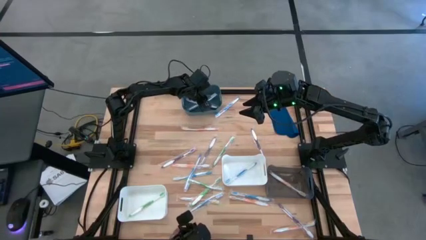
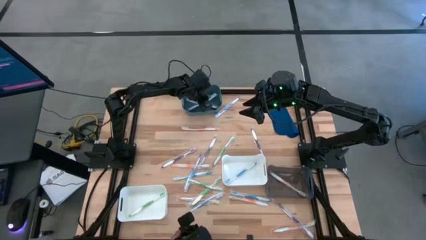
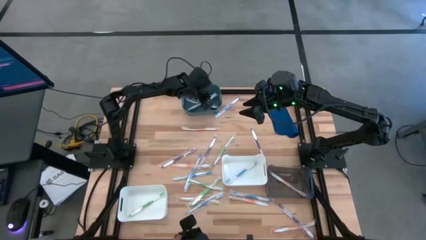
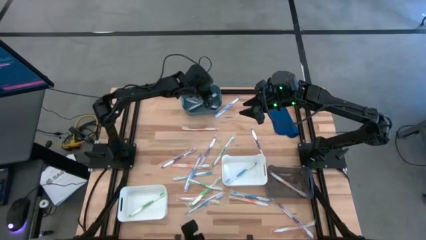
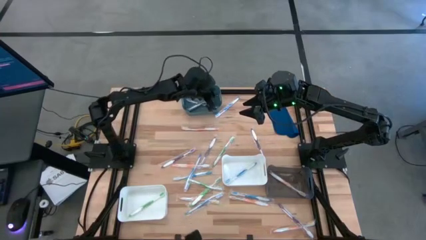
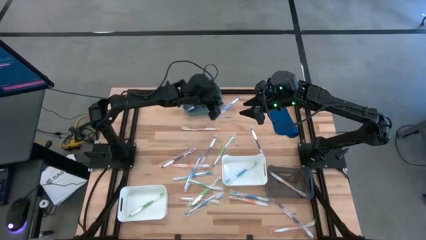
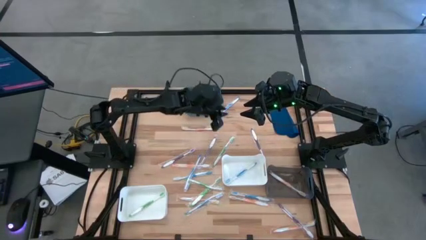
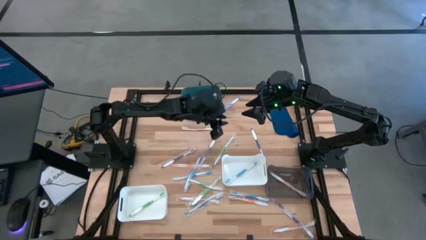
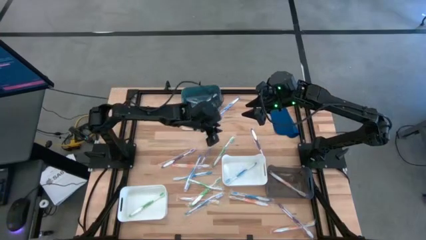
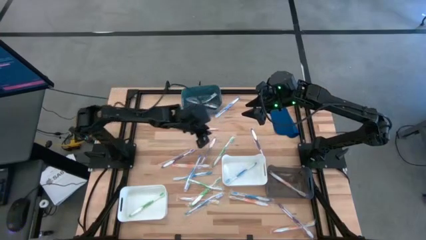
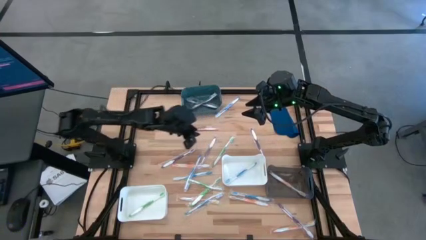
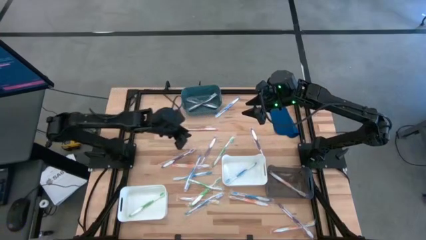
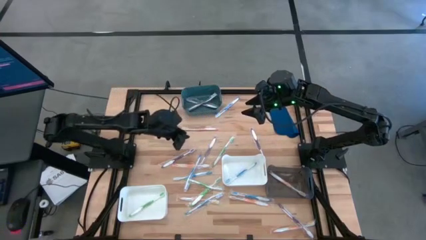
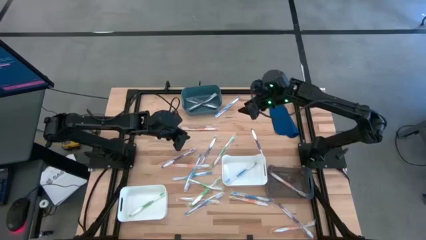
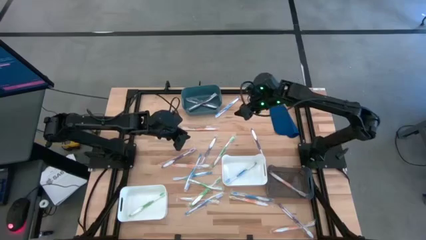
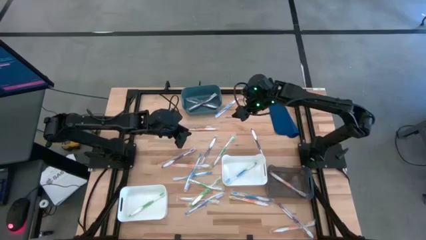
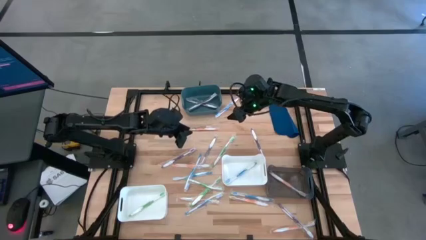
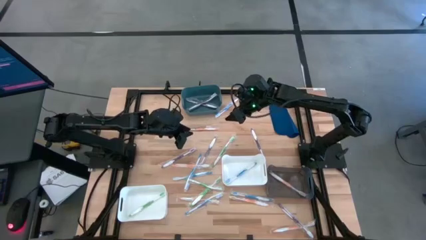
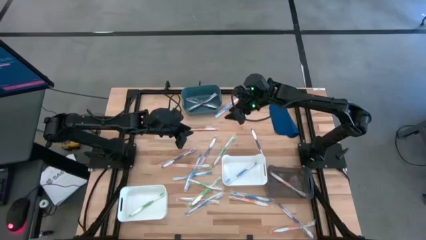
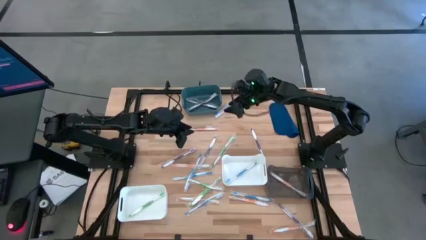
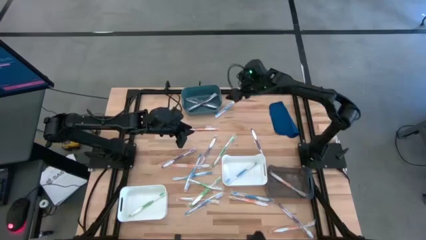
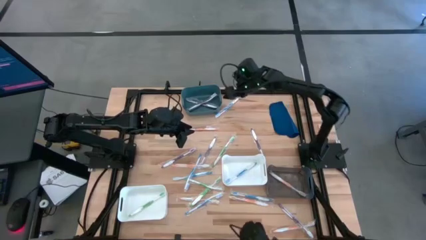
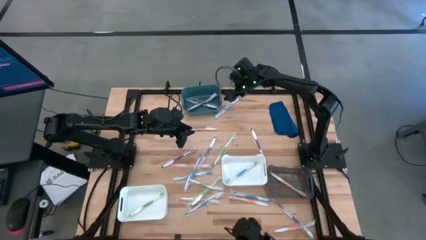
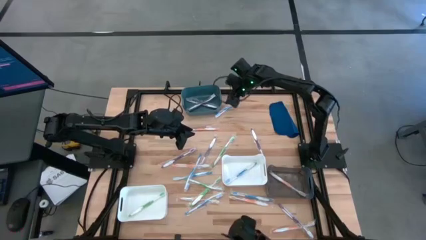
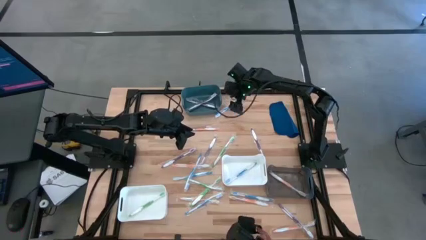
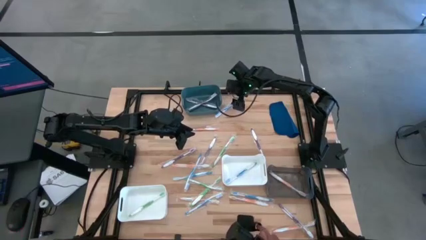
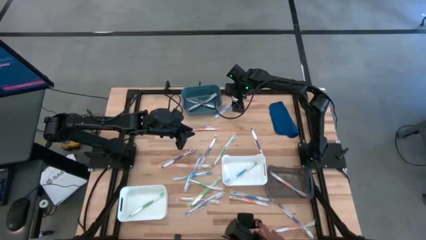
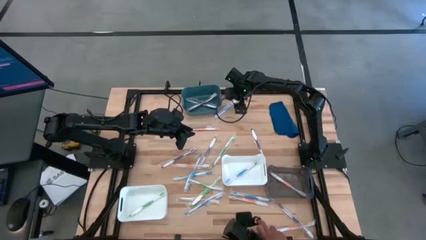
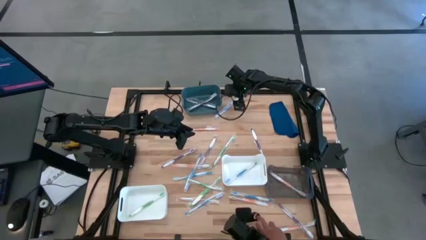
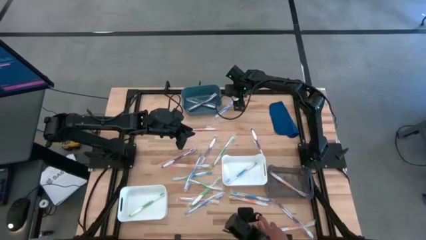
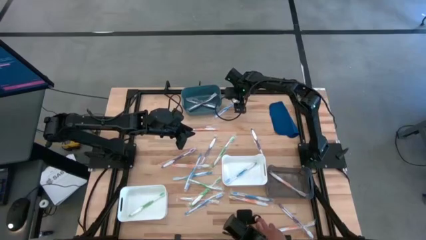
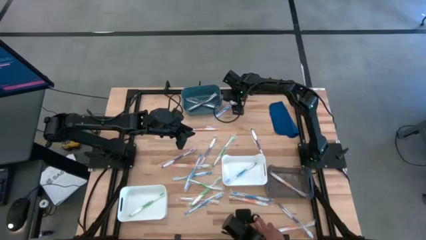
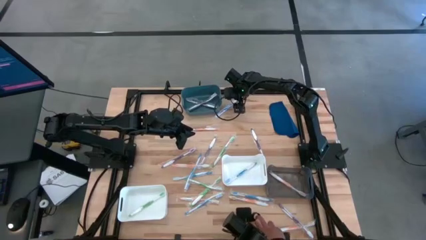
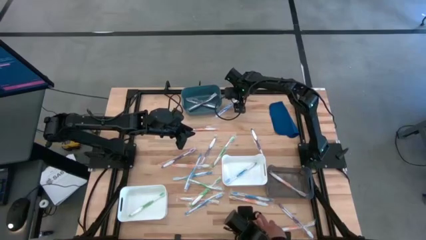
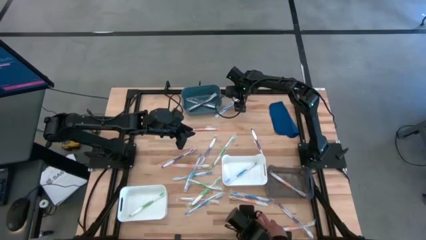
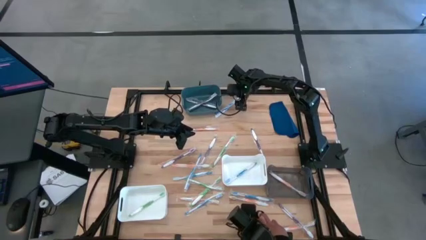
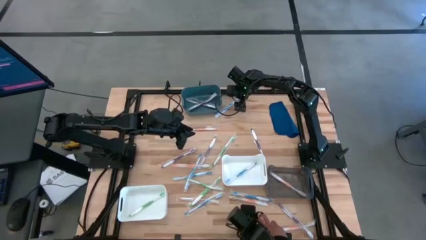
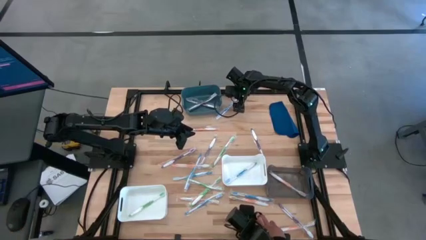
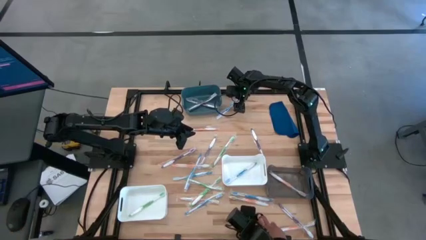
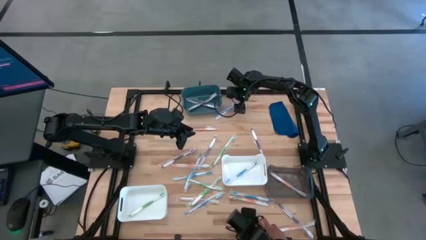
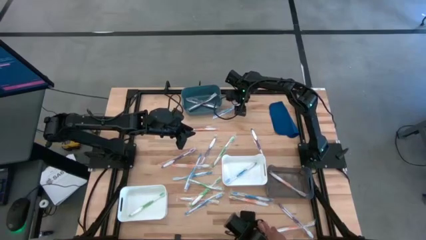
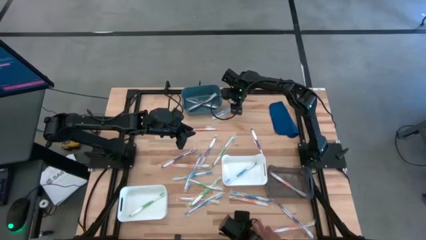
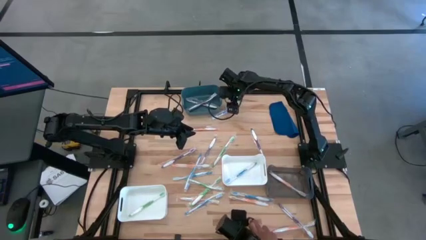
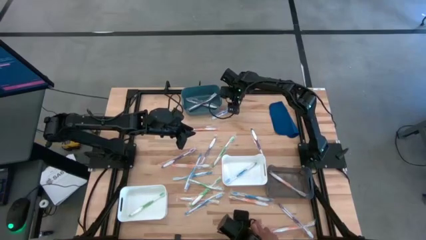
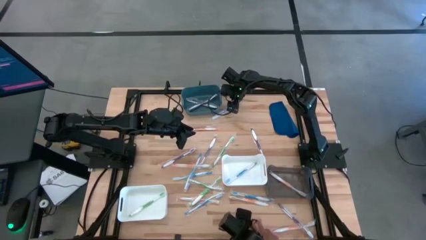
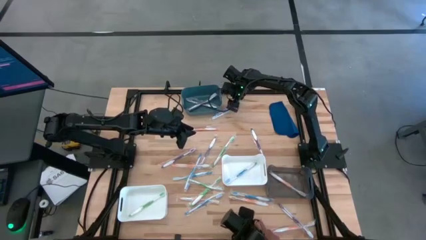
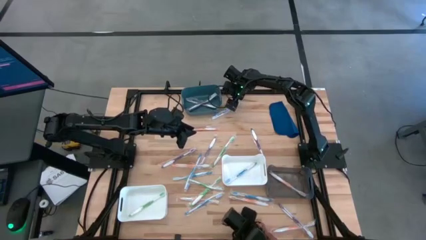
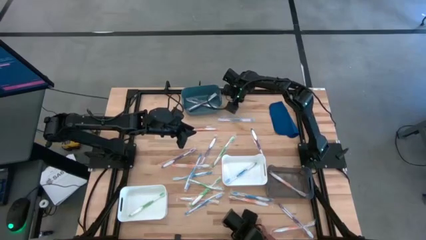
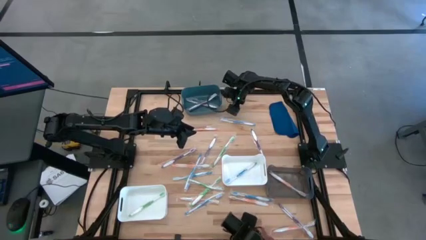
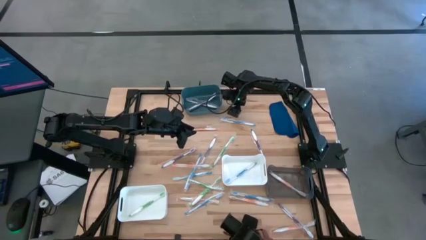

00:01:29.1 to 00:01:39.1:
Task: Pick & Place Toothbrushes
Put the blue toothbrush into the top white bin

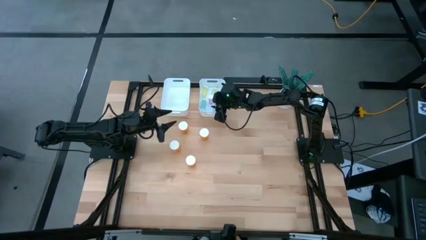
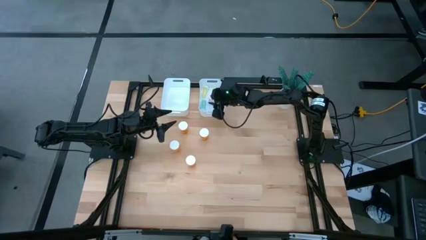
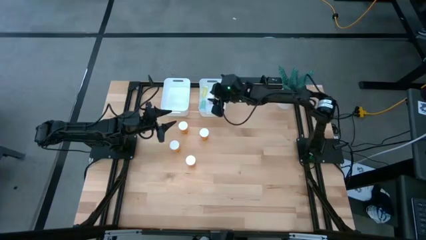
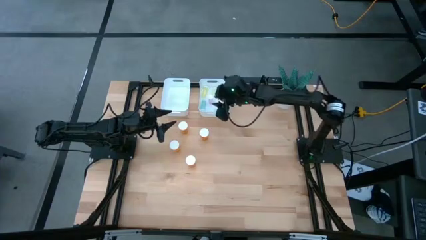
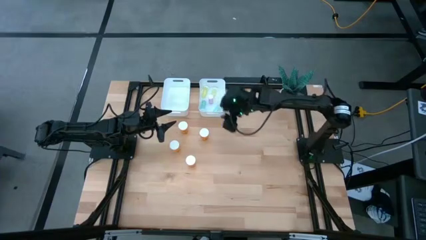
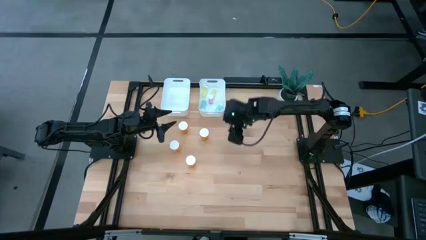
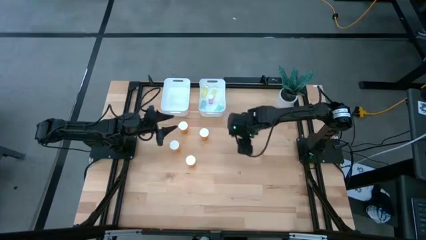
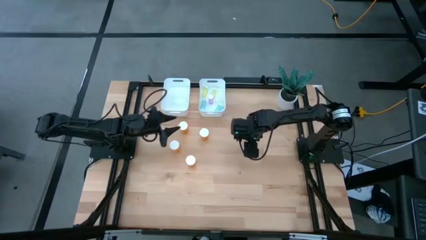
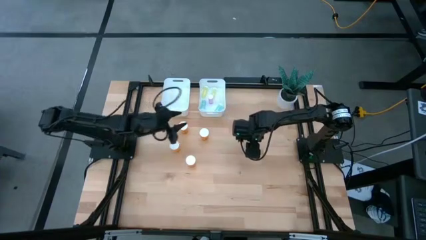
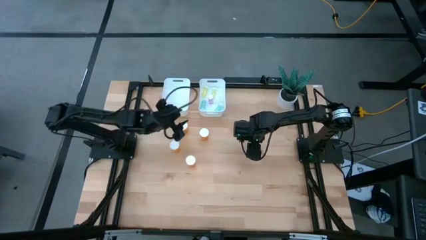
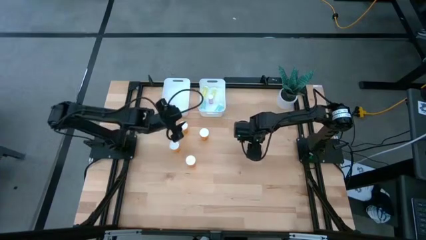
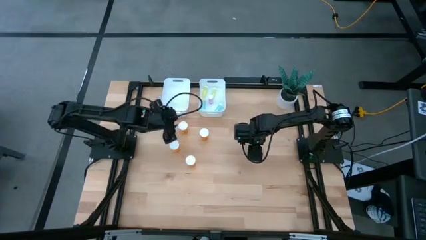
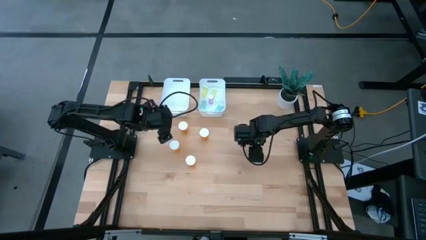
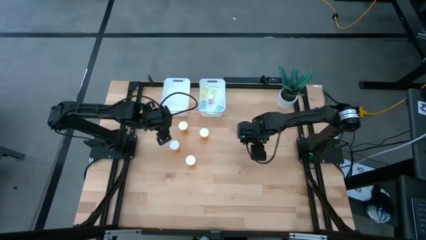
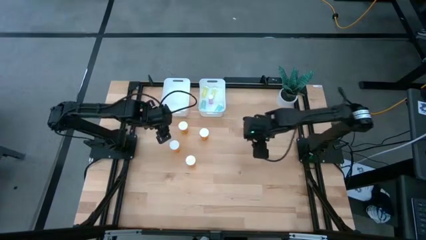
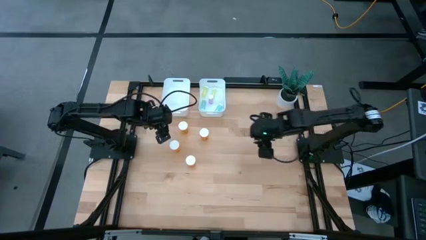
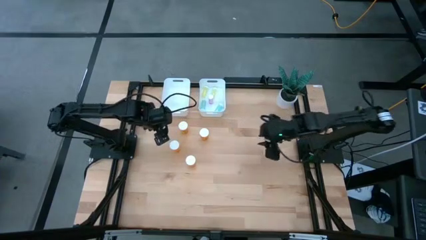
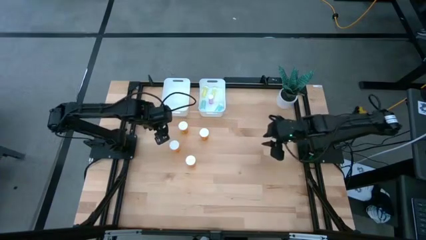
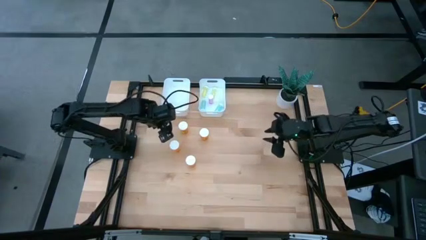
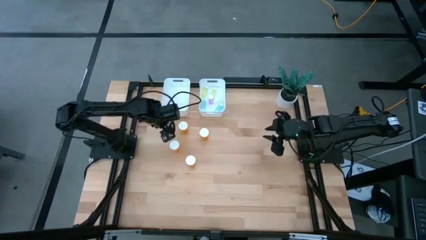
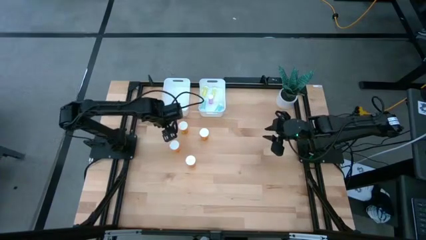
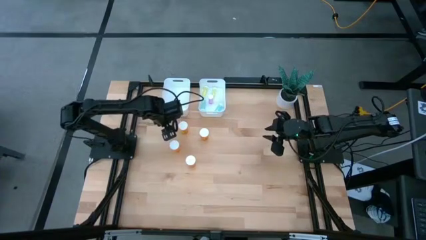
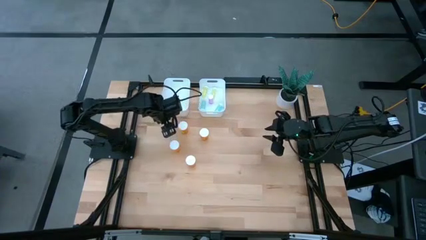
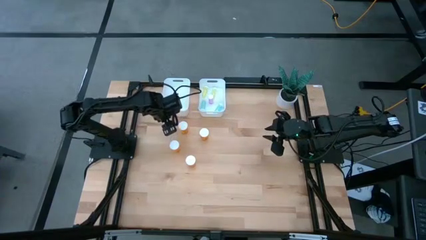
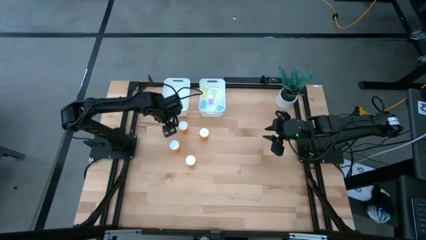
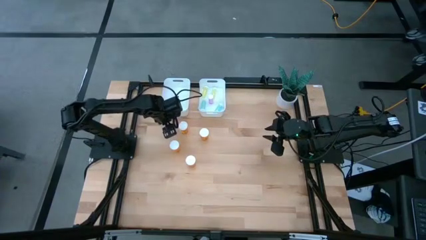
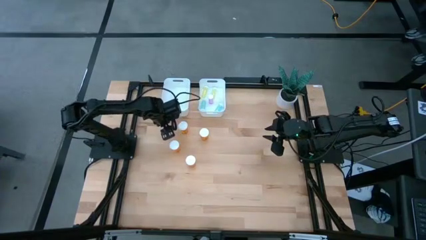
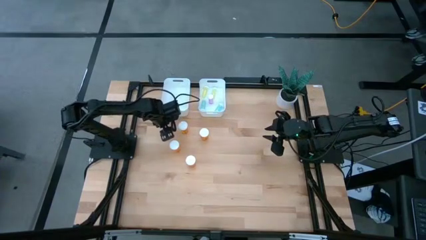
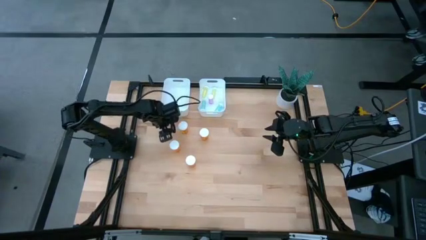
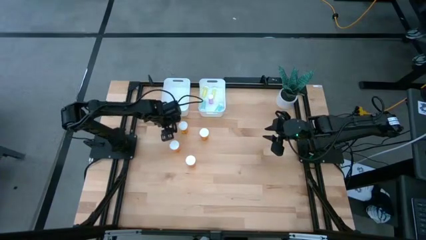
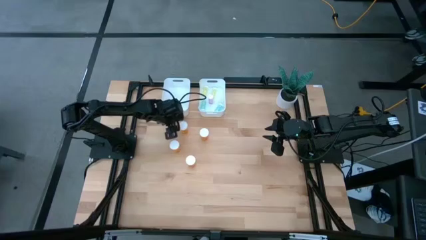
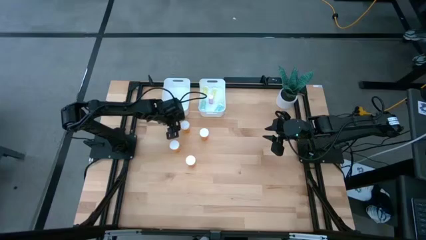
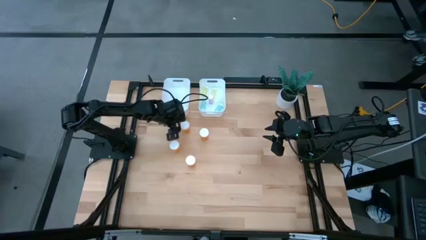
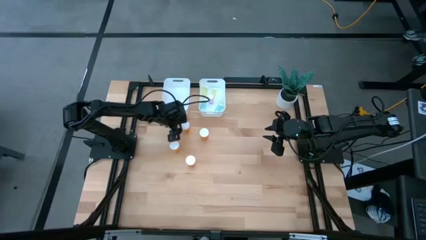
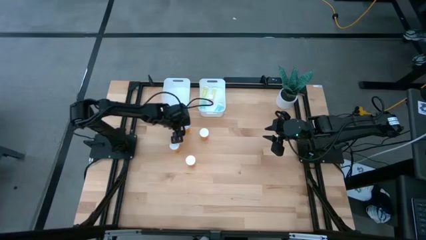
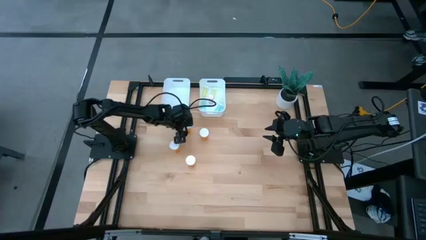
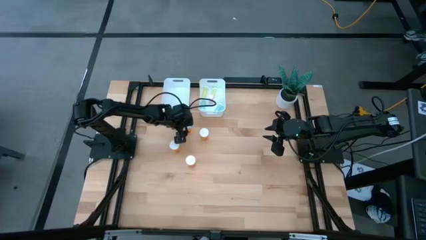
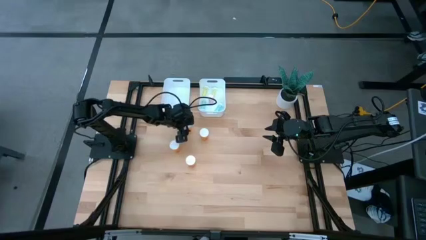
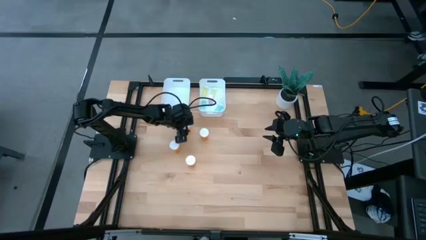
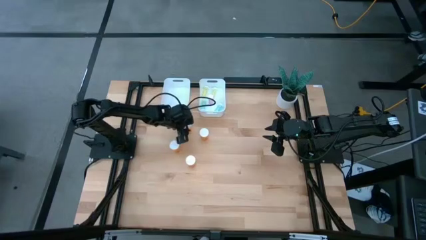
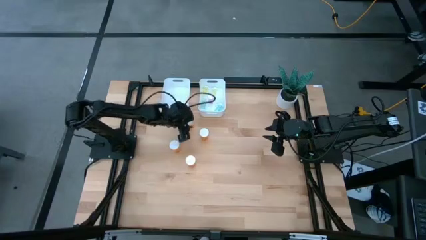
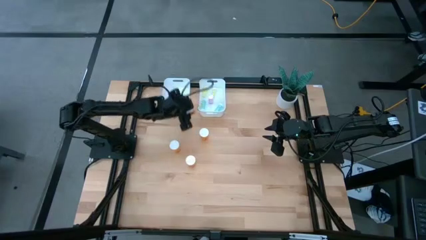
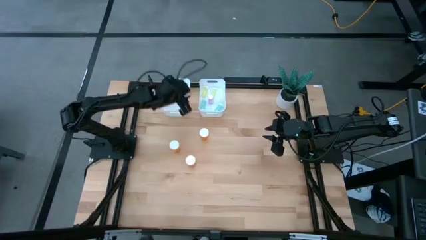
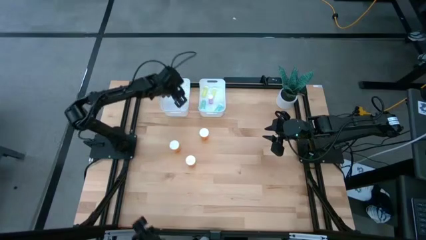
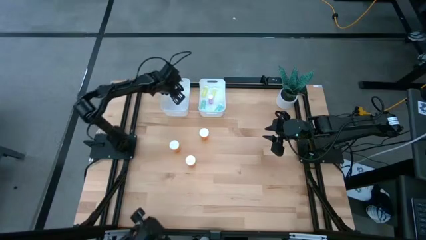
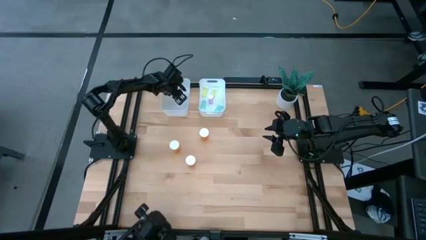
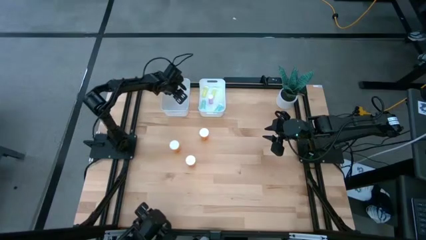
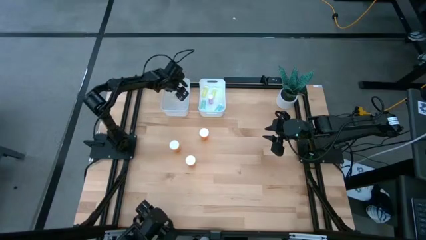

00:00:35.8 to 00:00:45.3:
Task: Pick and place medicine bottles into bin by pill shape (circle, oval)
Put the large orange pill bottle into the left white bin
